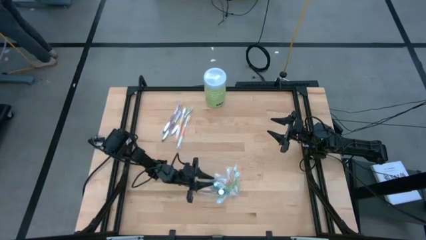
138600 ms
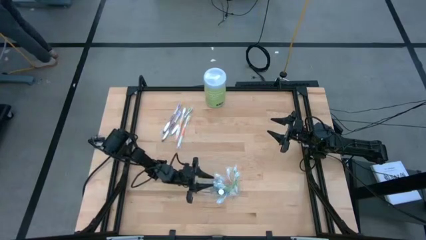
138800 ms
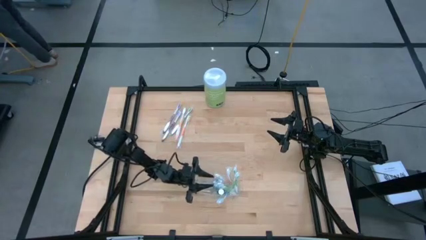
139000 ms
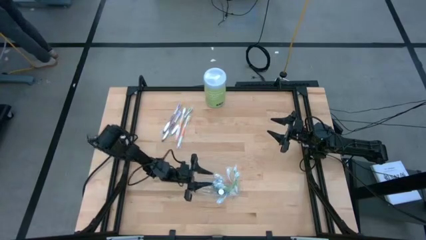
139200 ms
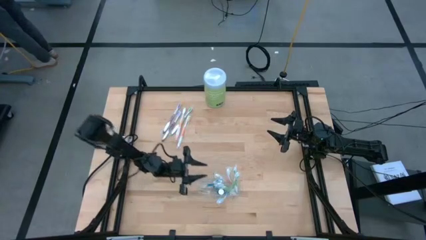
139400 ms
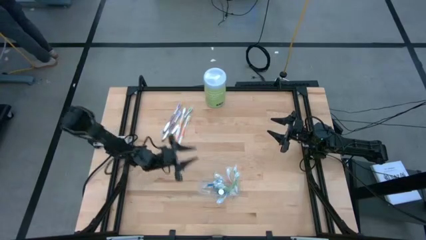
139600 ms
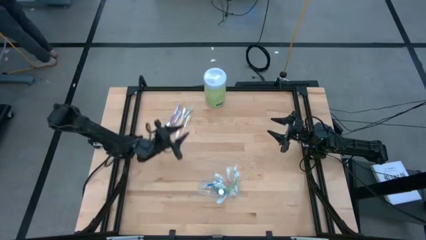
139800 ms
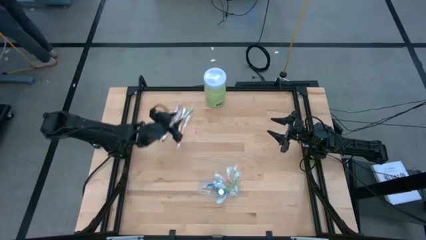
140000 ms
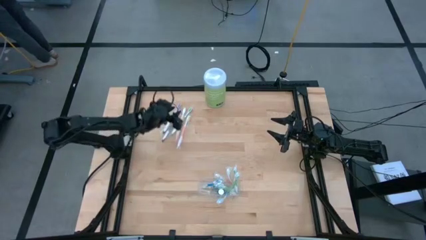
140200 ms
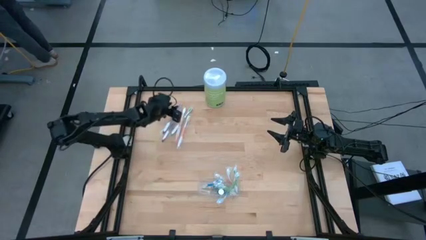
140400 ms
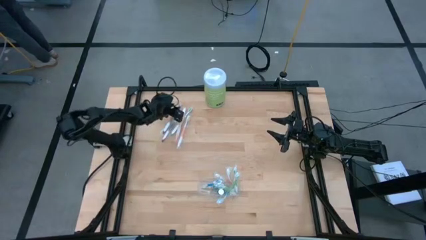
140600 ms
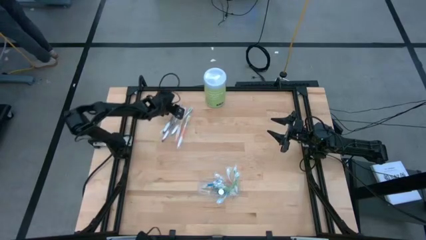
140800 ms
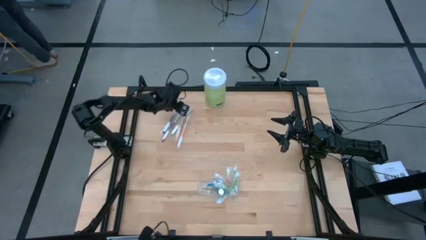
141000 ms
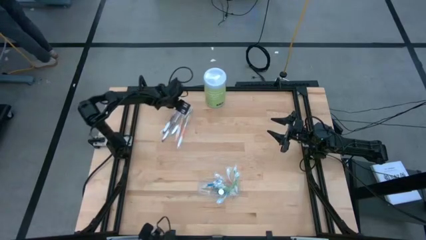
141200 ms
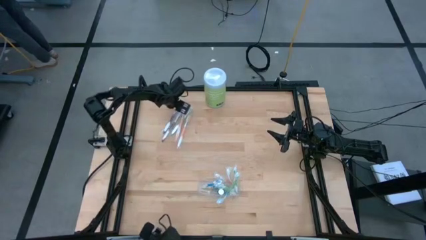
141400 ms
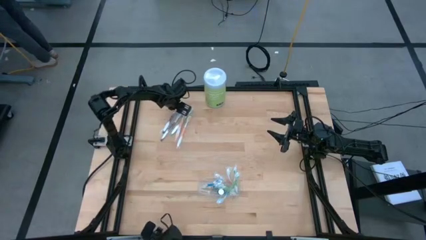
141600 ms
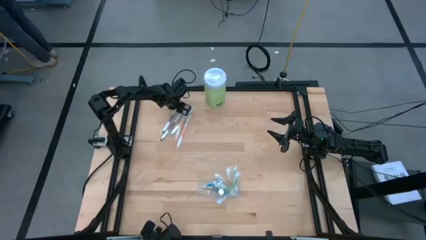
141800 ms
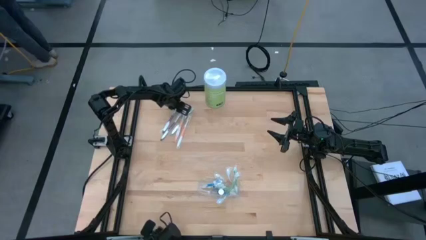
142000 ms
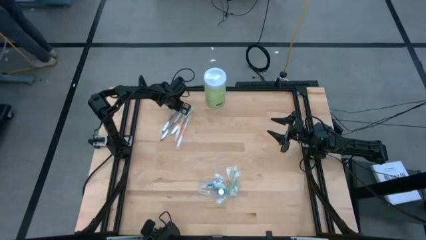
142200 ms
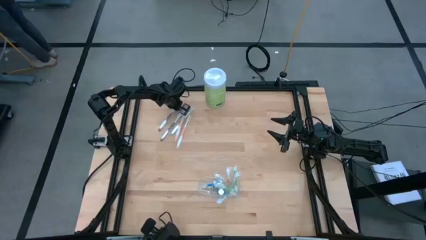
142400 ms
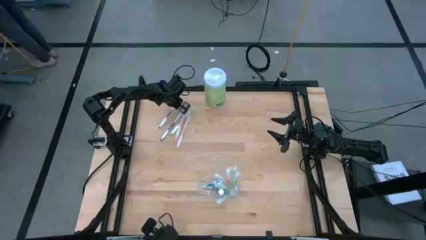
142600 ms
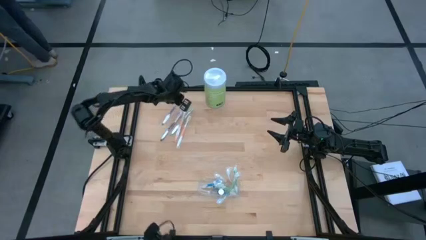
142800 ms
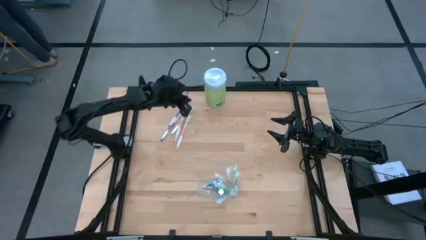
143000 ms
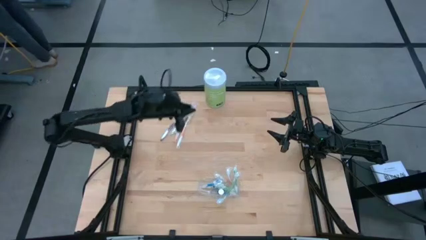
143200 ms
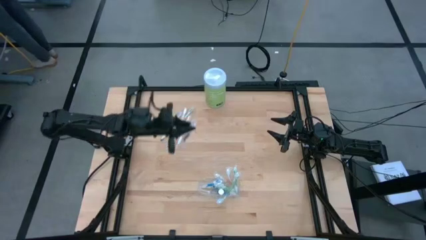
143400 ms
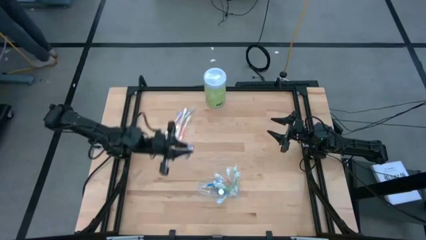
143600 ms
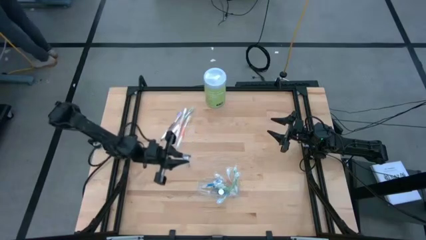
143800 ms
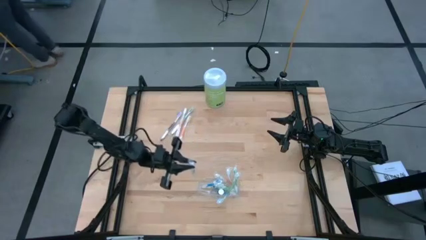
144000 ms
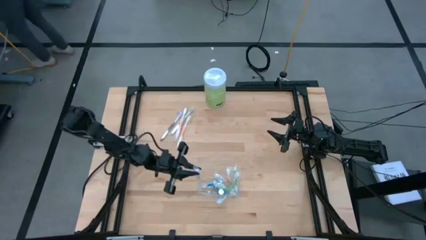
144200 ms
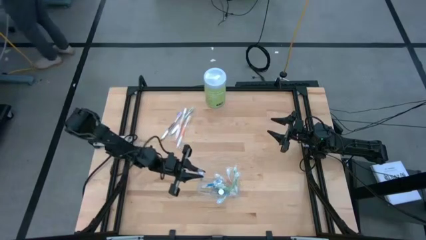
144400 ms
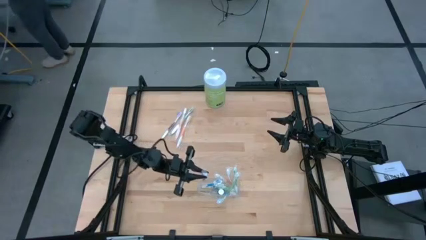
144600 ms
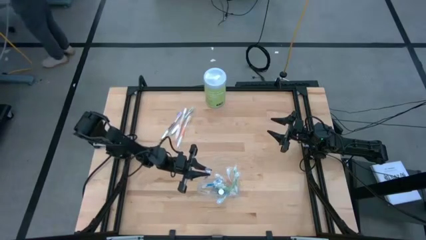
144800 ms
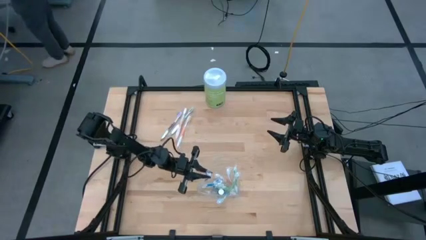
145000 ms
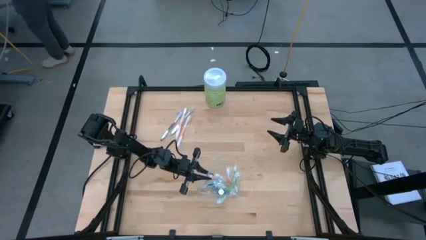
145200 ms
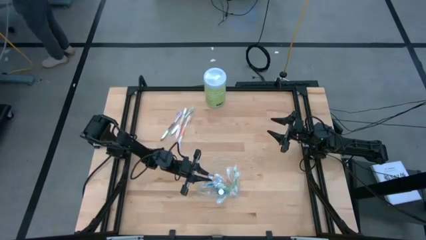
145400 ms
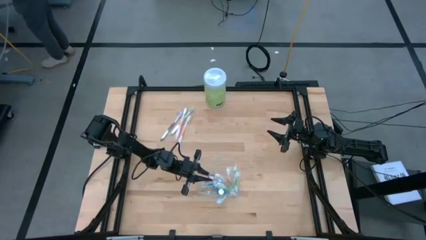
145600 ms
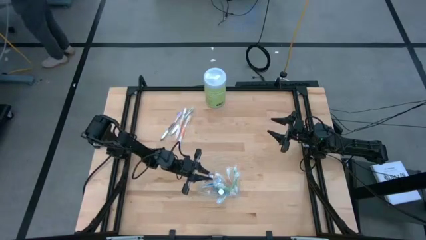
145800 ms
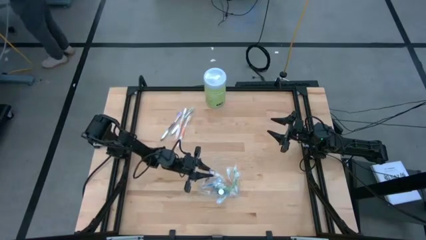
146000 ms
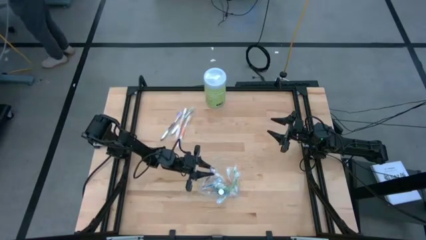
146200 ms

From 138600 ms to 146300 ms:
Task: Pick & Place toothbrushing station
Put the purple toothbrush into the transparent organizer

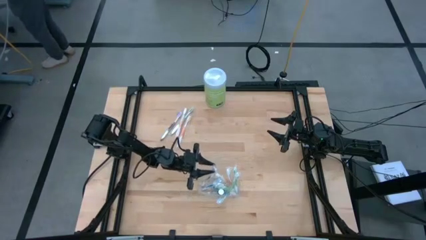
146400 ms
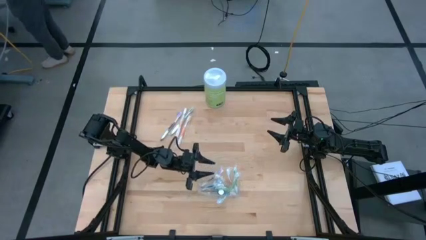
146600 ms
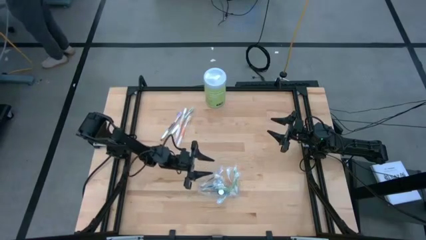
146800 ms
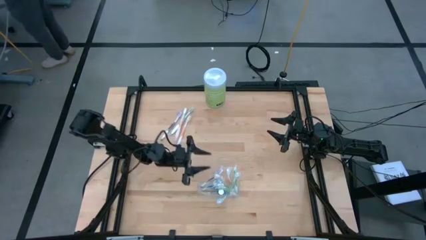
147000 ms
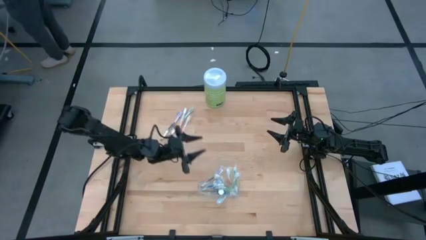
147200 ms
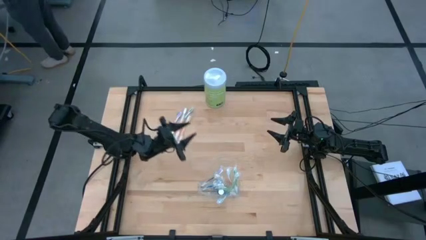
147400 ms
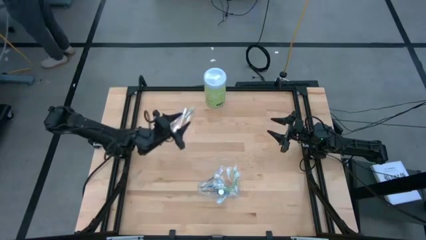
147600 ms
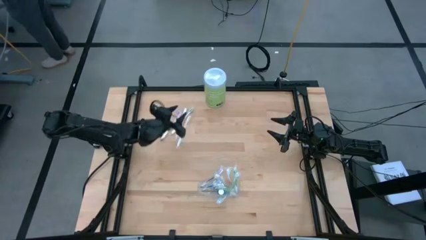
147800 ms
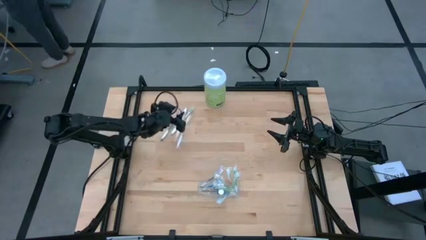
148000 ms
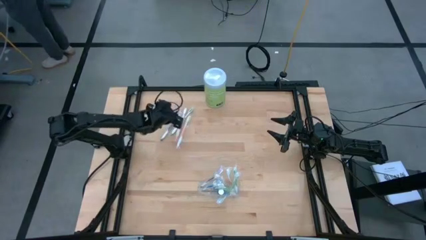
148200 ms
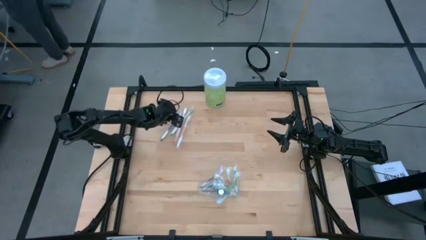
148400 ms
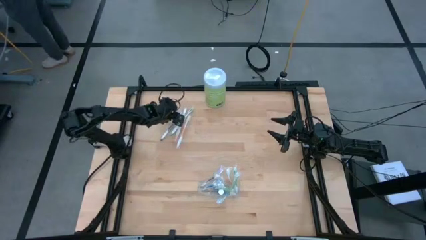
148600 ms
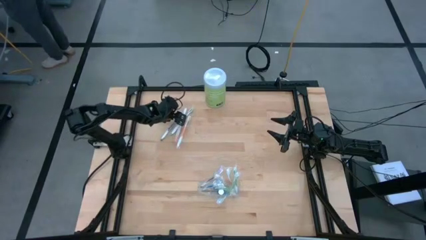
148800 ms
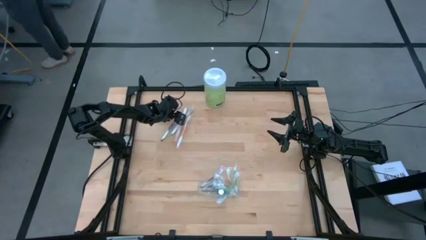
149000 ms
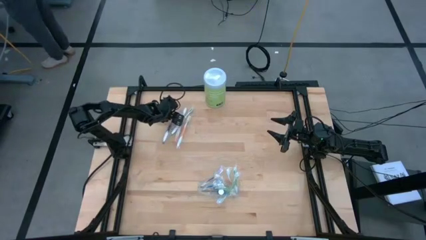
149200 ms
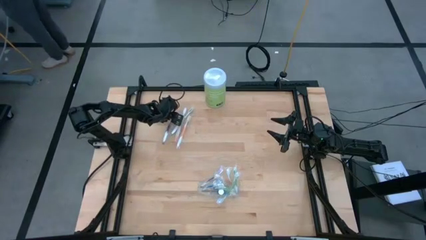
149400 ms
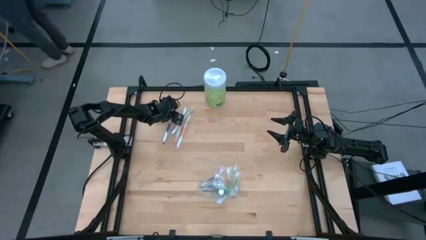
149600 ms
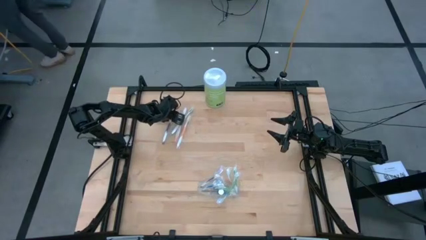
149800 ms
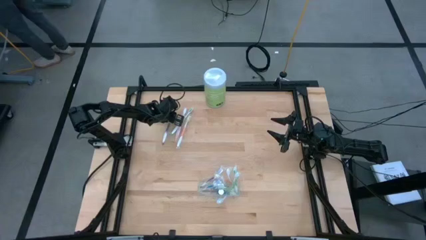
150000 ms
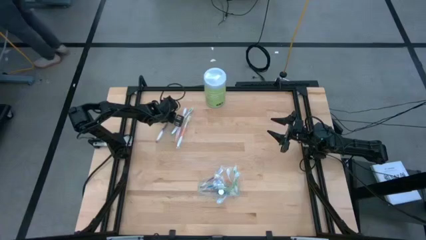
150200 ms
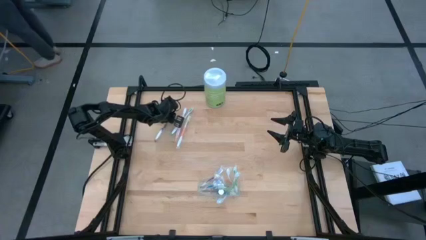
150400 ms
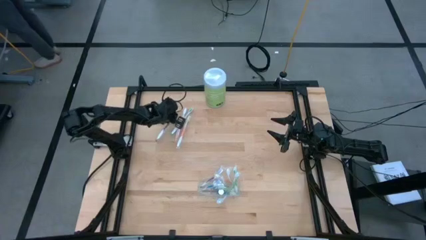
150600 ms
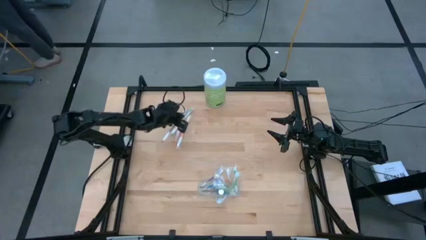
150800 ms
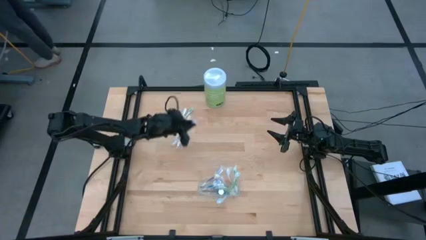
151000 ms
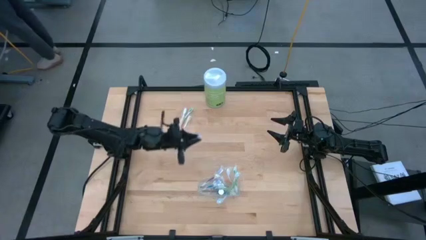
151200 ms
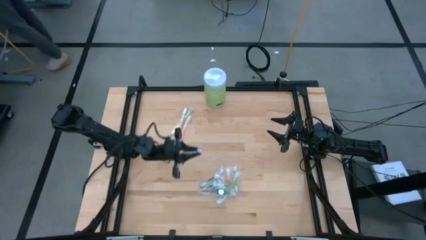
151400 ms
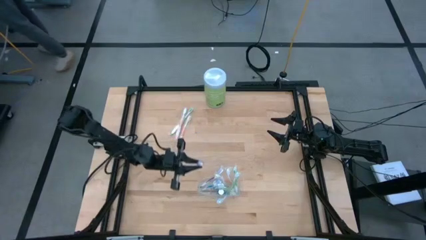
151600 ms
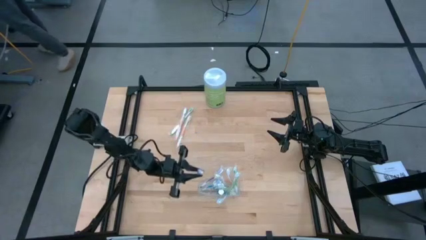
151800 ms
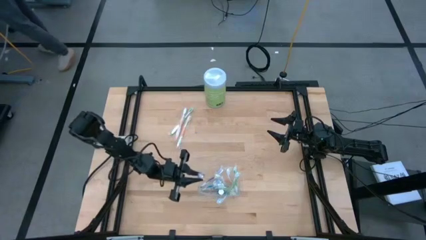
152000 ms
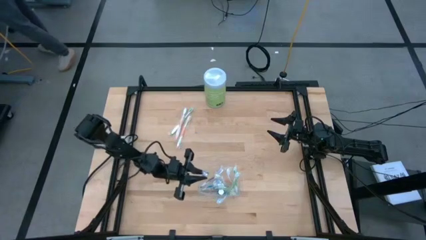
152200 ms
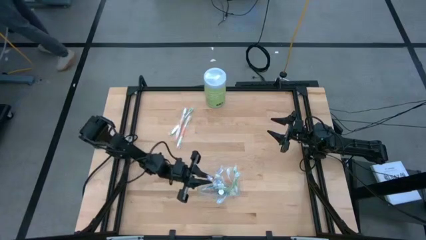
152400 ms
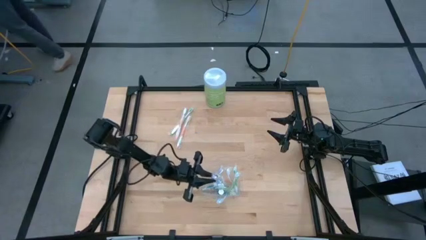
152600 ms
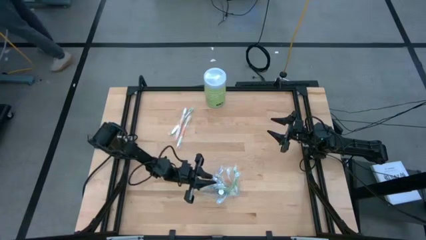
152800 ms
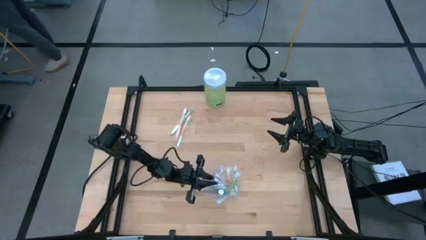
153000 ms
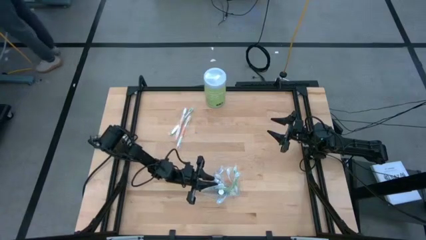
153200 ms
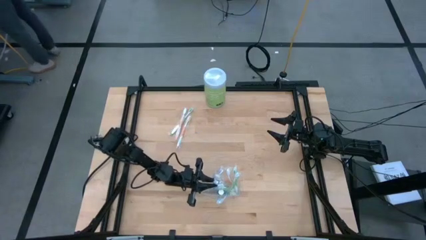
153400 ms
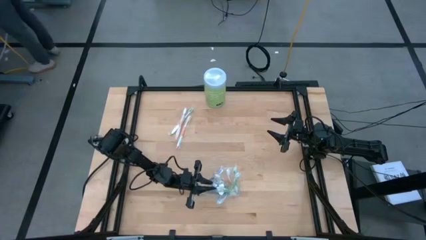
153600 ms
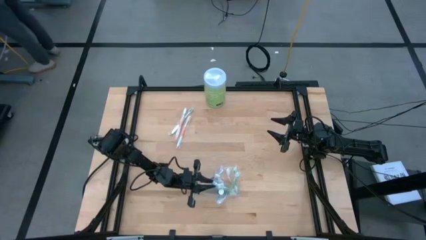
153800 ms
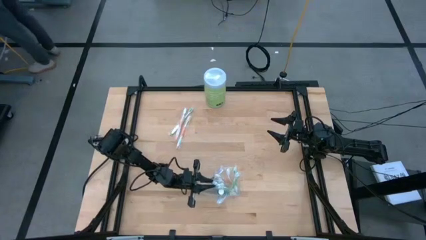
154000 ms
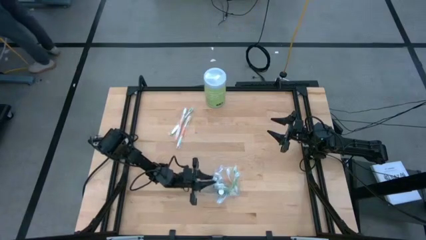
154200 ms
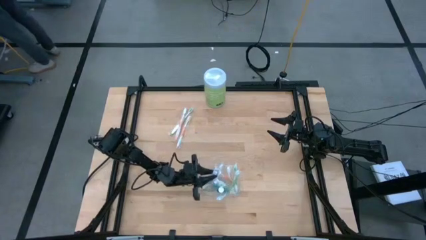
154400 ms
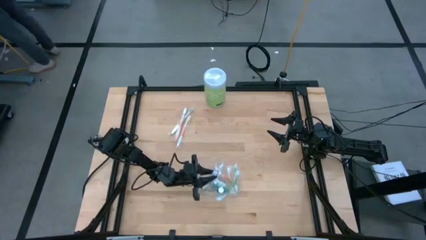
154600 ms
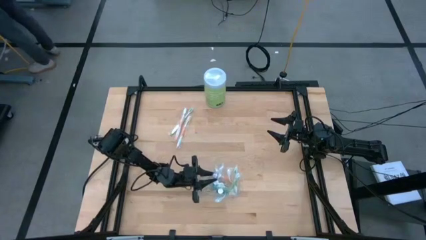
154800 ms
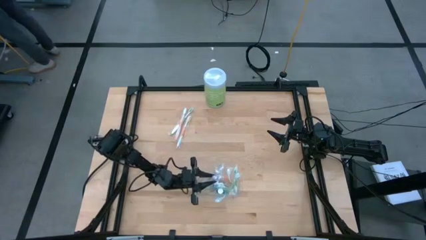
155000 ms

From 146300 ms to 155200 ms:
Put the purple toothbrush into the transparent organizer
